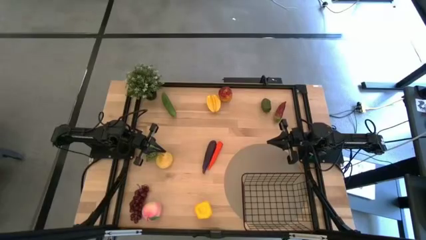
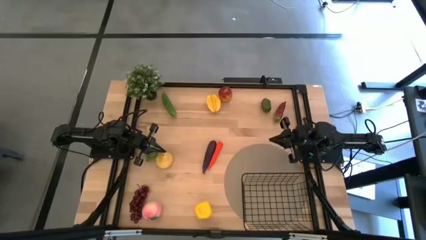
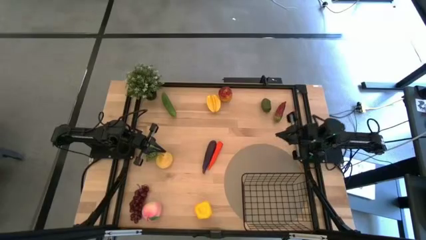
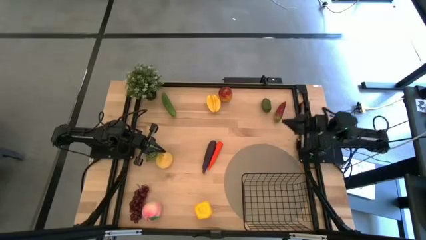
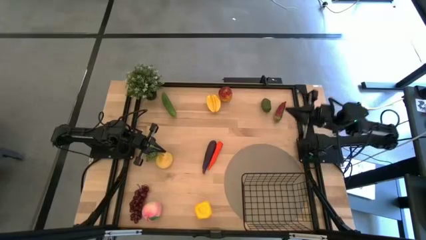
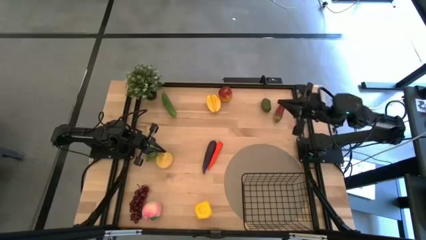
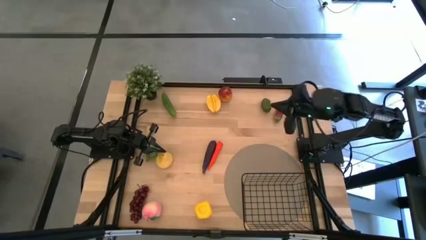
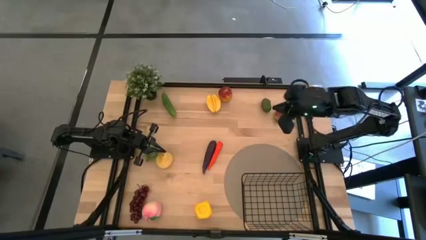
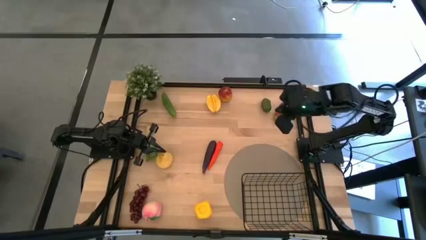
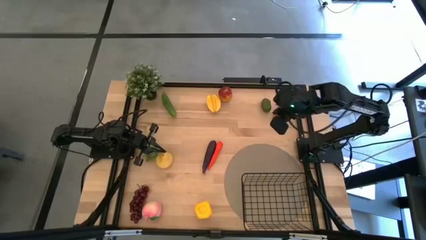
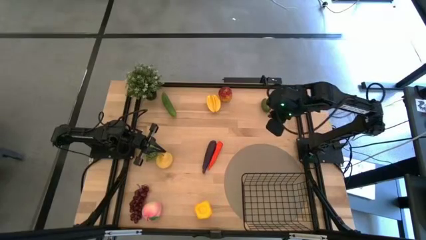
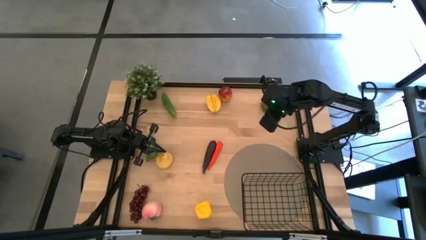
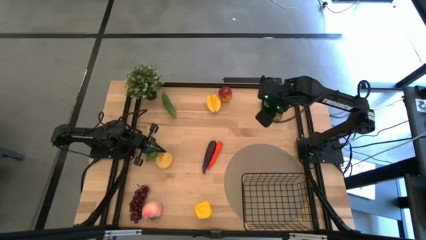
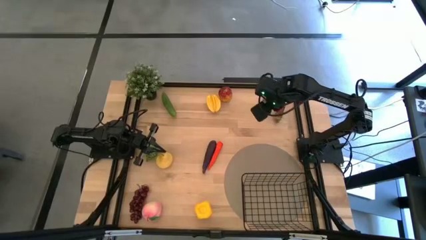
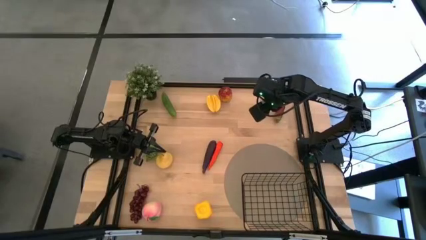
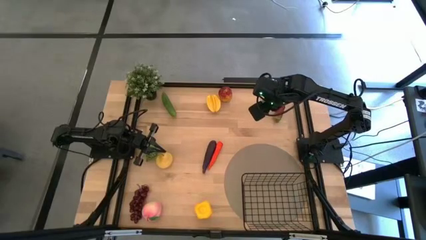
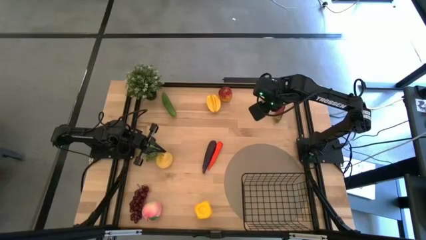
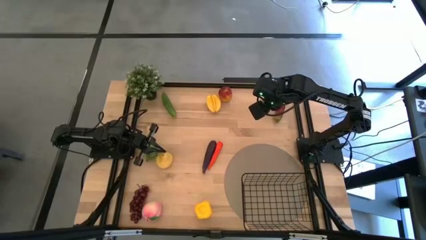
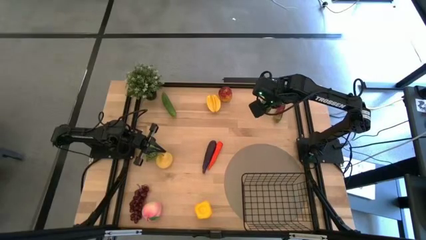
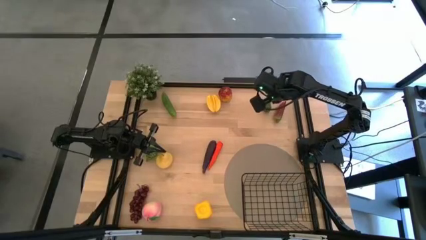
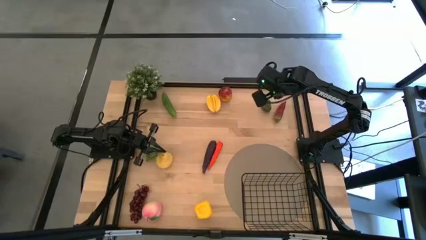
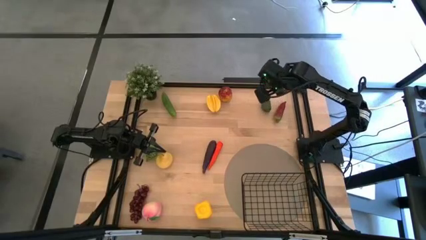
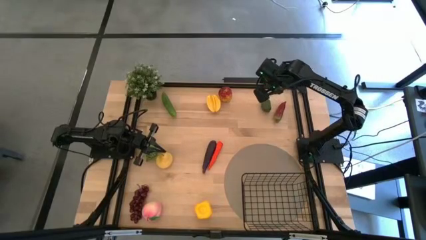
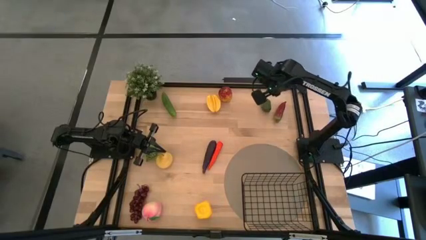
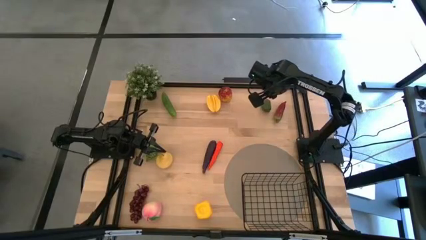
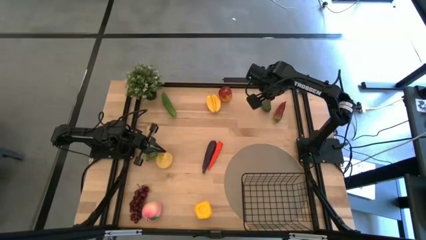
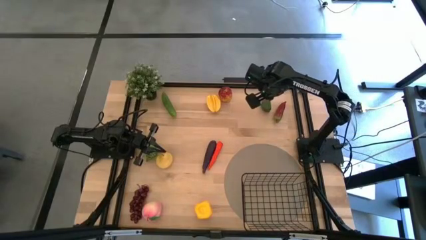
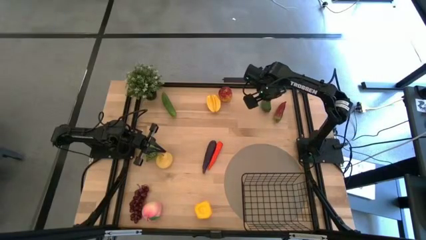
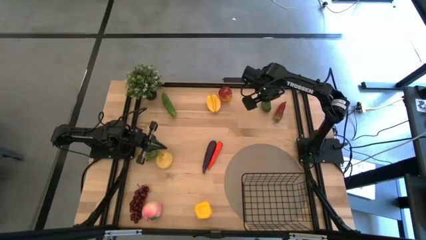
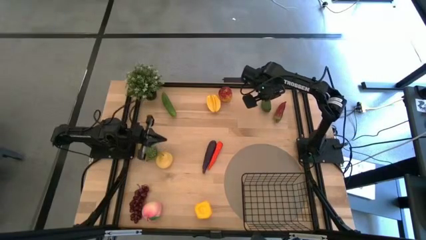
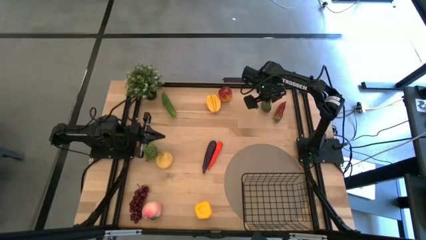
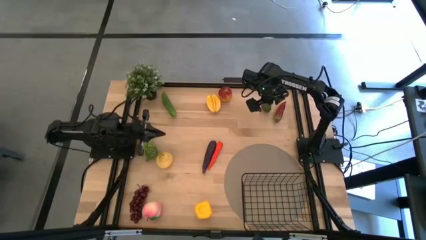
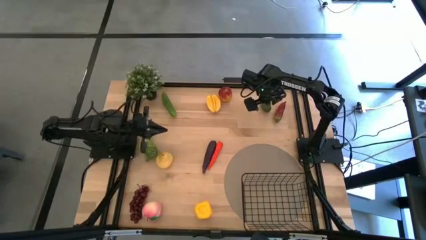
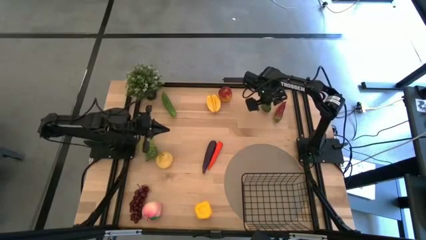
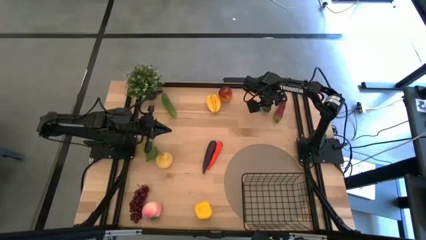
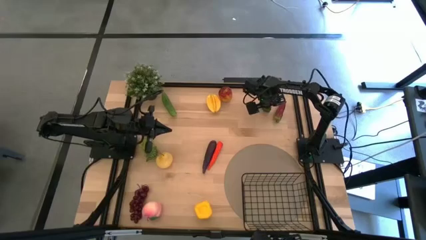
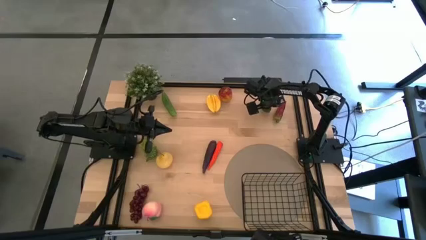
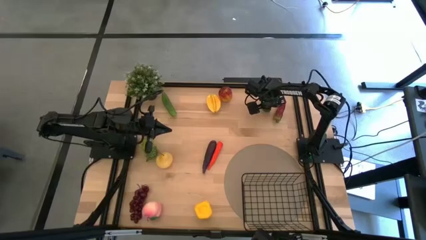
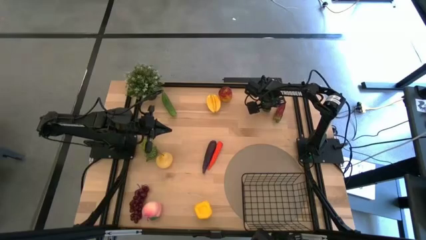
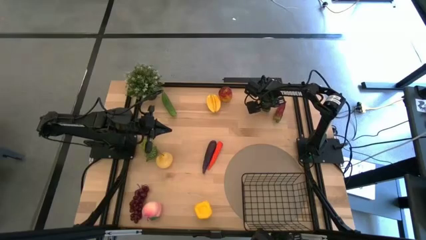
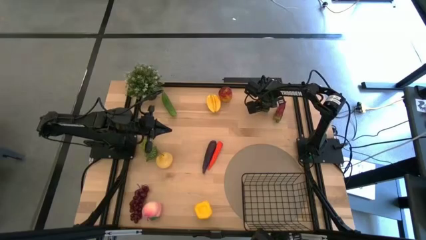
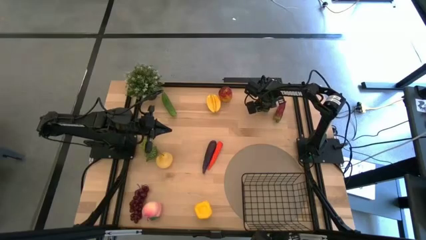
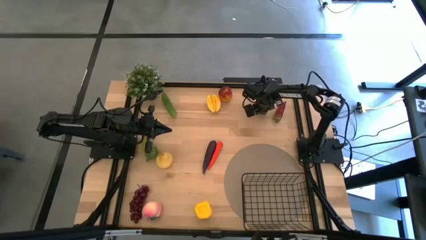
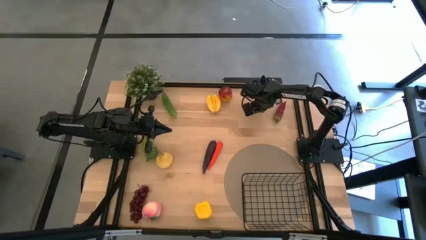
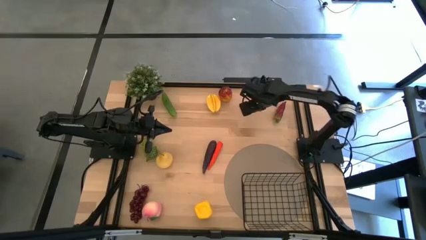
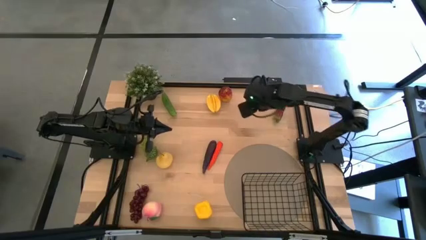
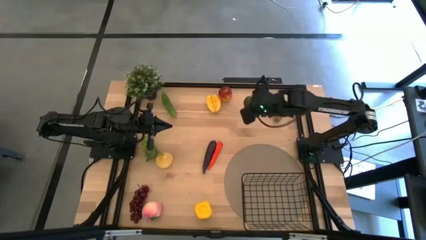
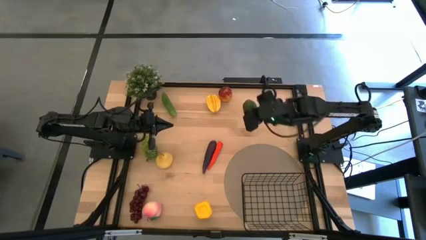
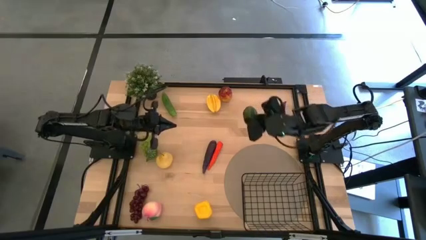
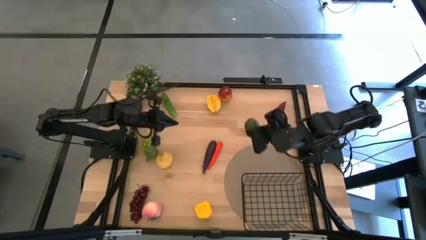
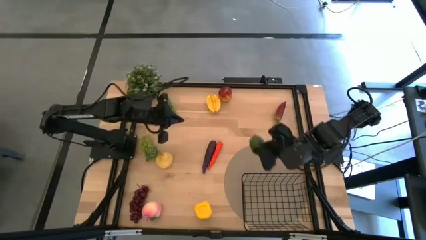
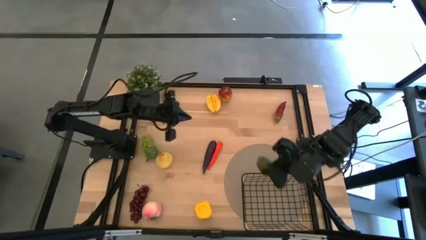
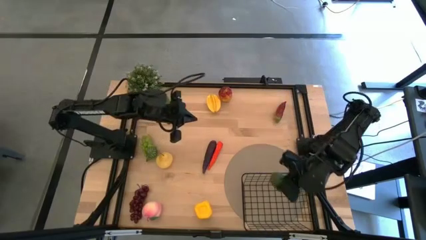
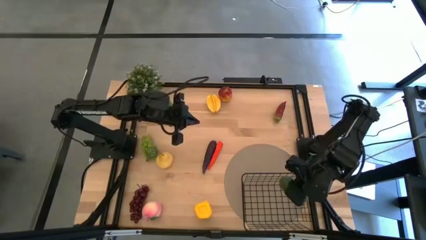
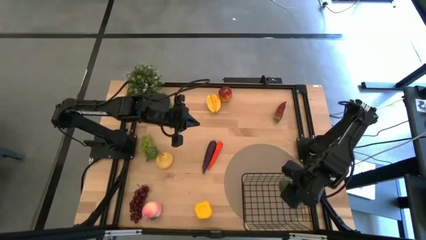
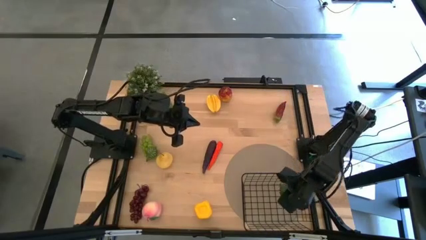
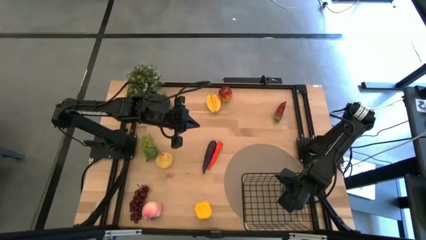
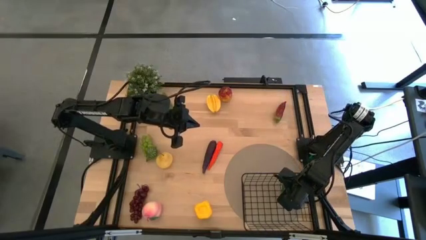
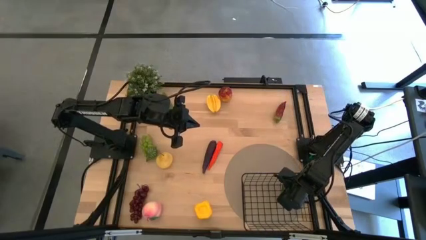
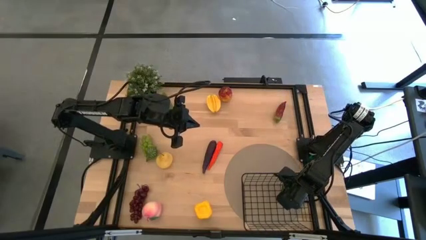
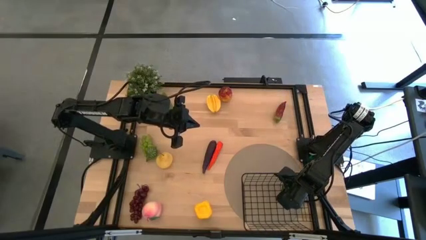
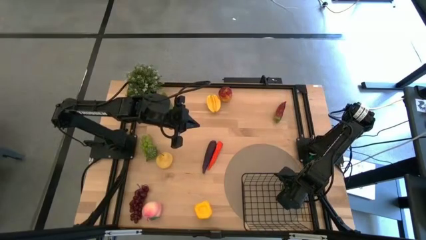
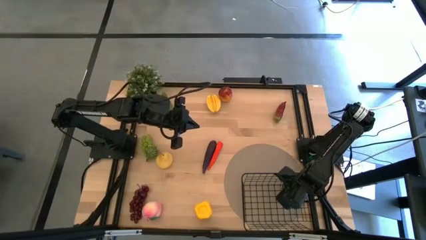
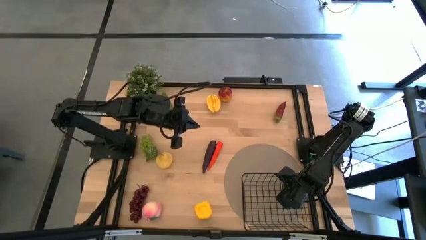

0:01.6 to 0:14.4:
Task: Build produce basket
Put the green lime into the wire basket
